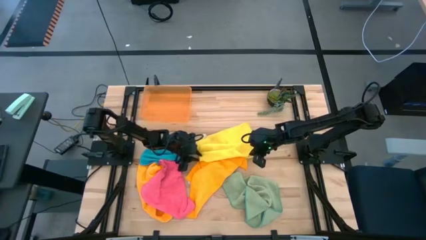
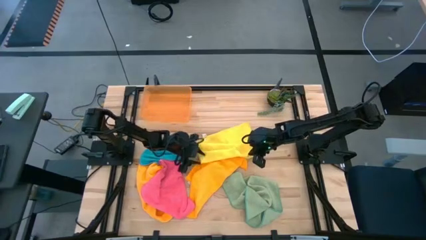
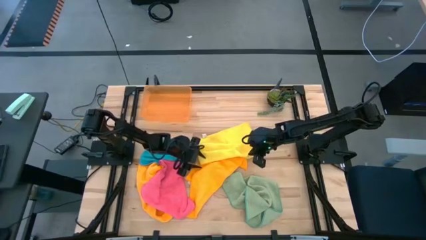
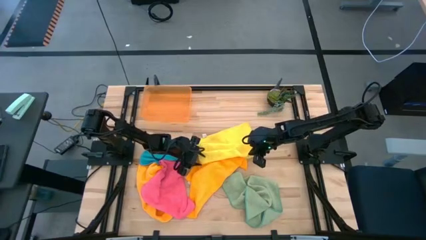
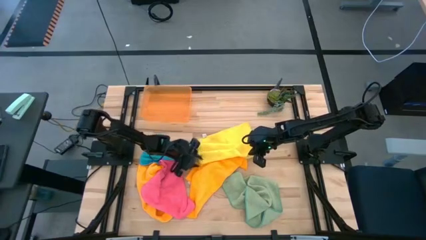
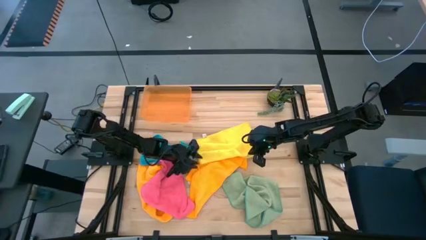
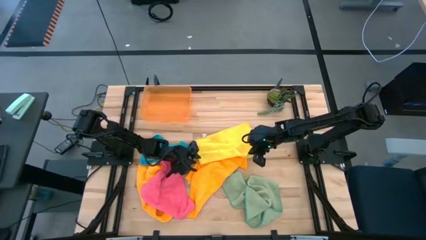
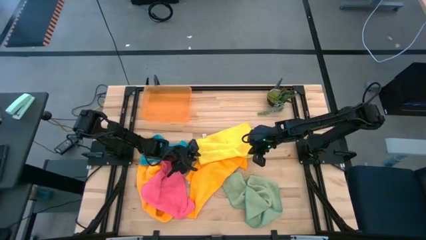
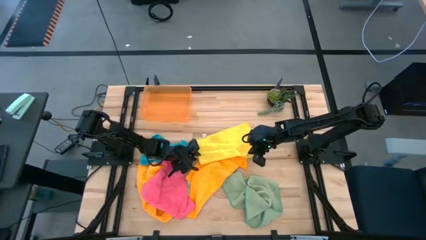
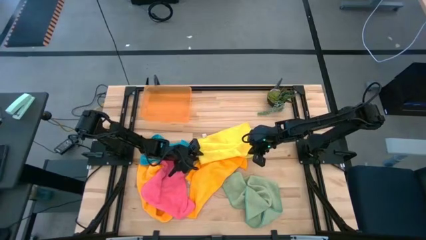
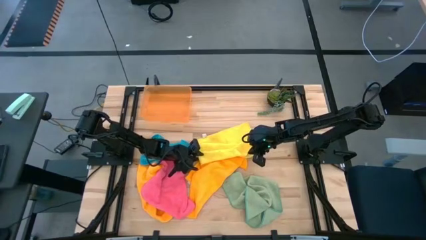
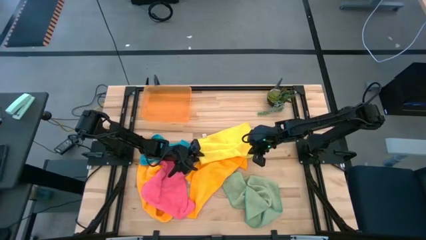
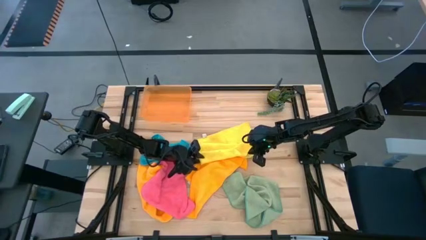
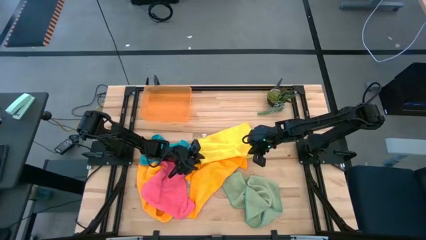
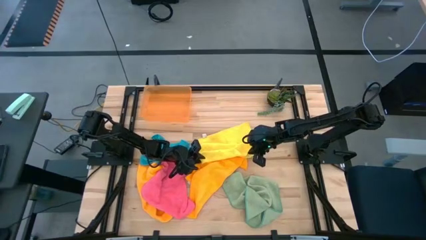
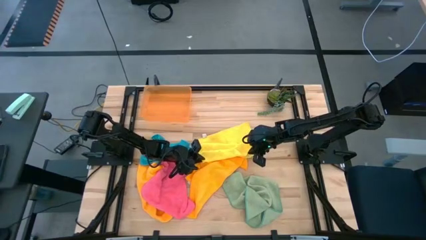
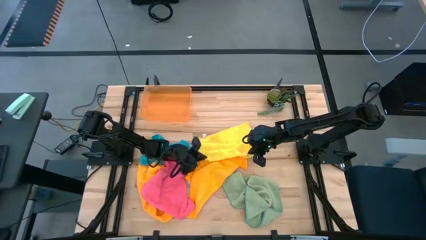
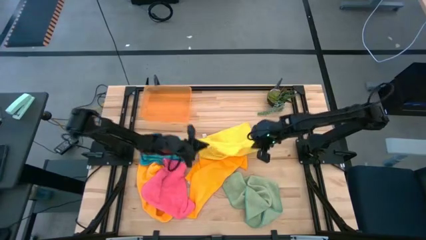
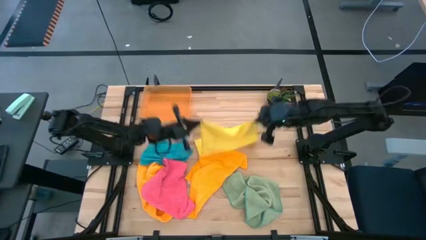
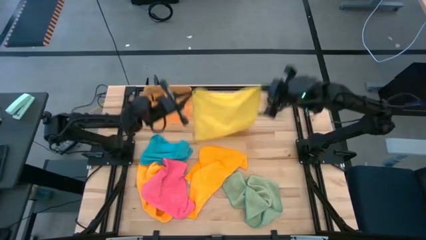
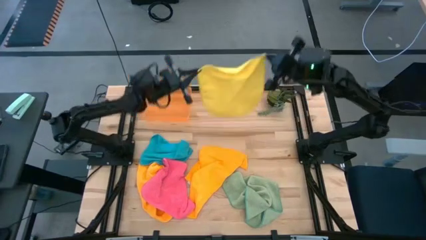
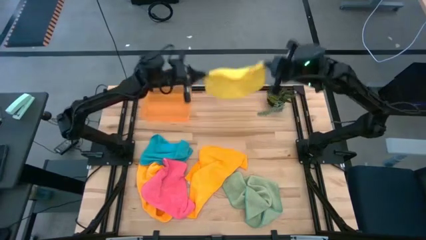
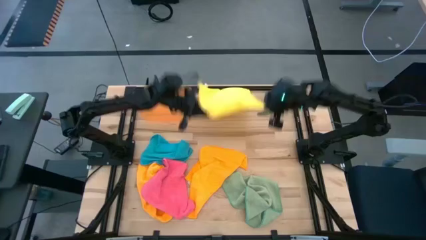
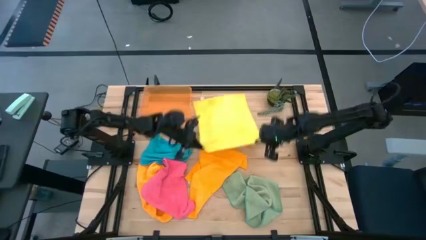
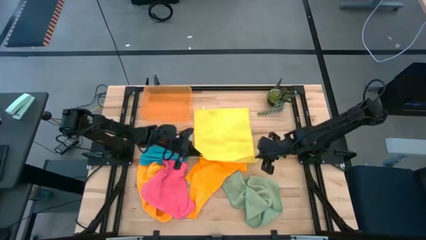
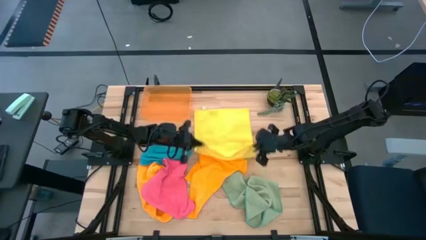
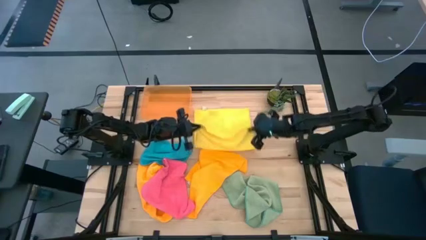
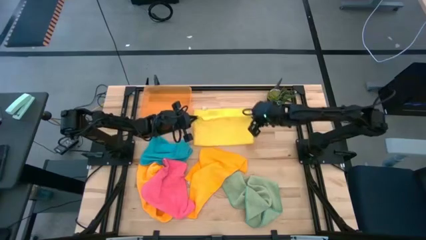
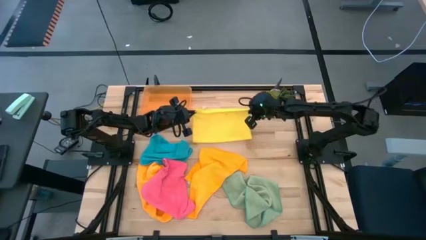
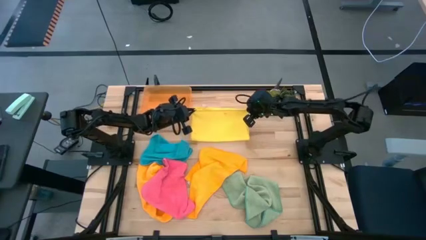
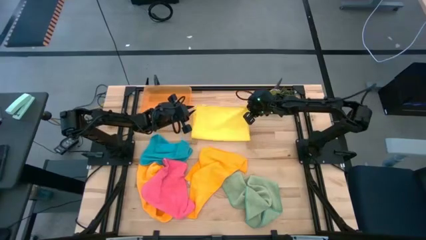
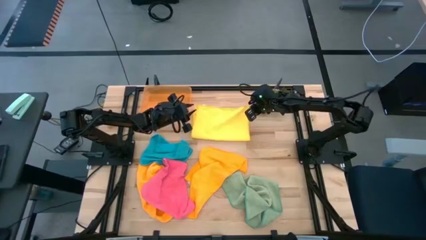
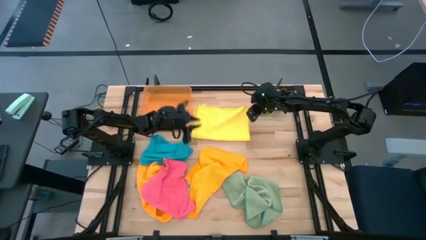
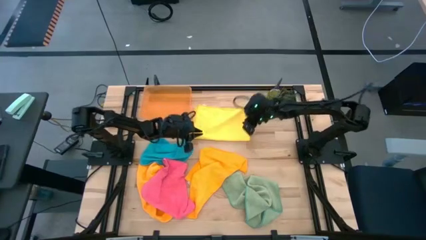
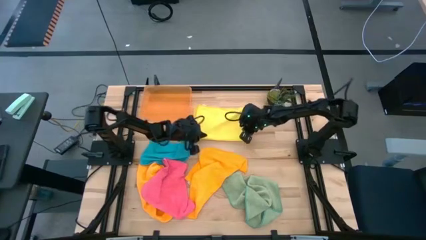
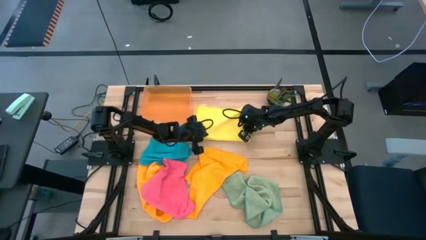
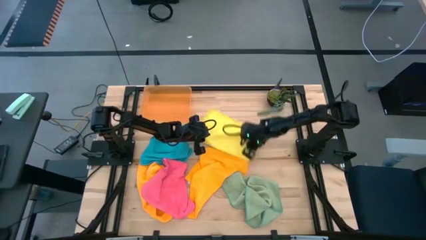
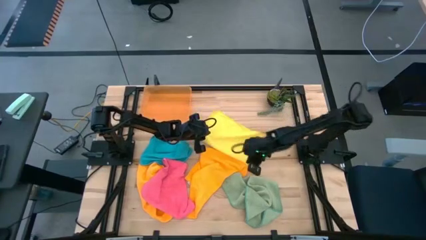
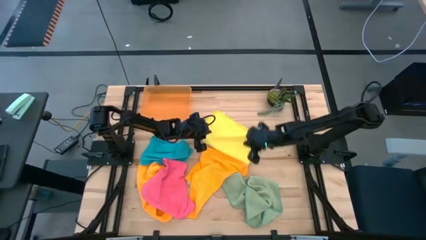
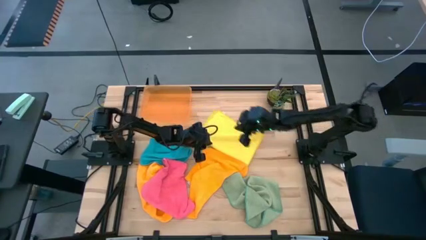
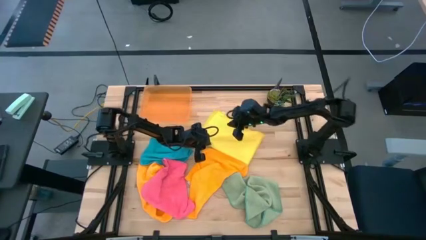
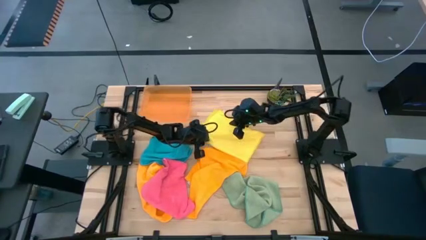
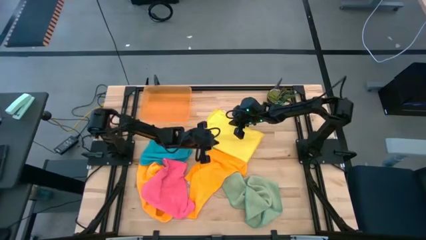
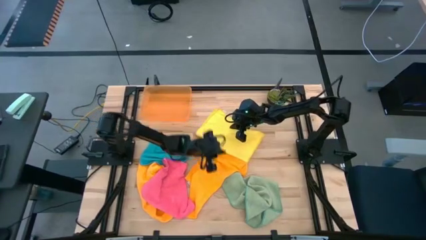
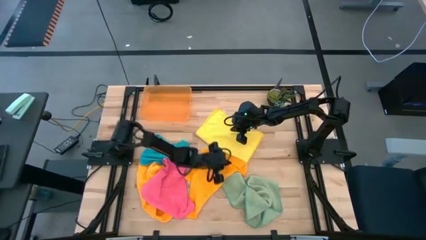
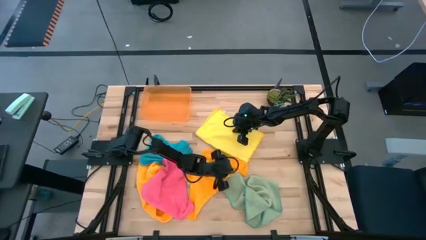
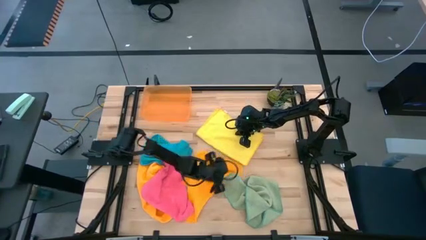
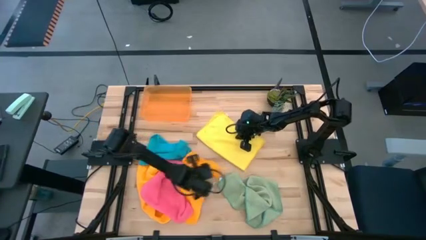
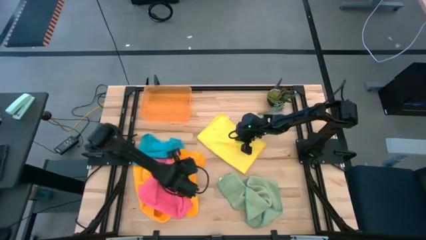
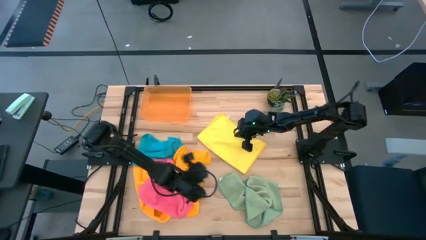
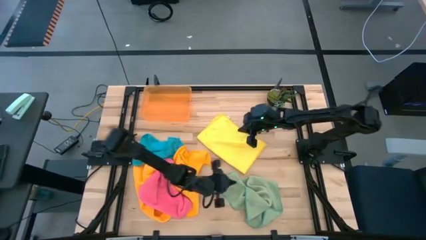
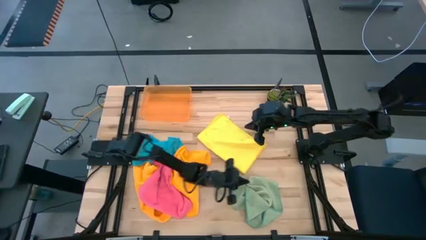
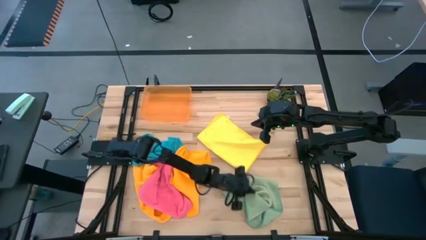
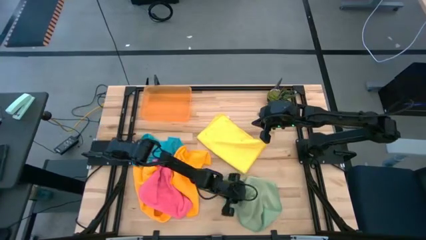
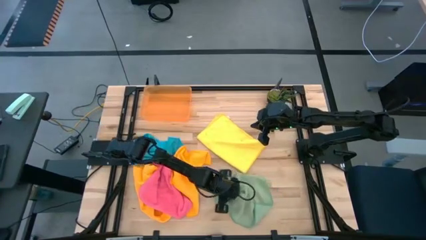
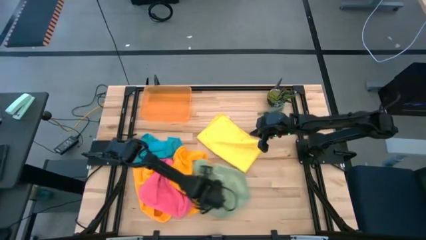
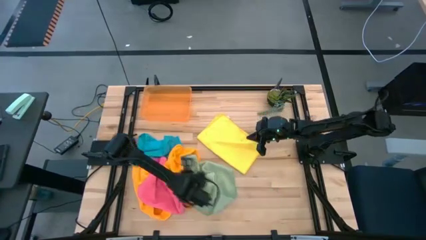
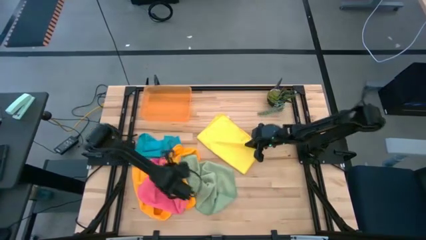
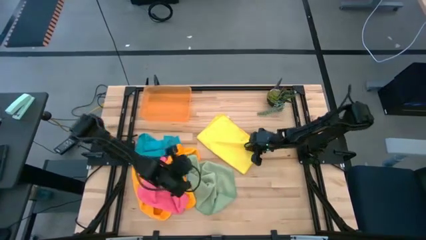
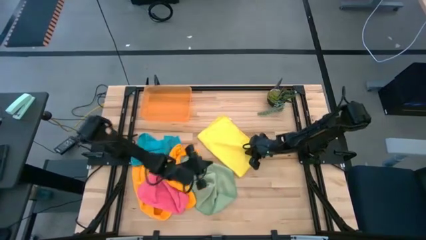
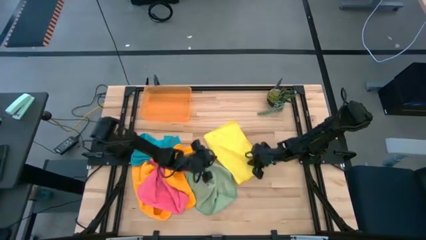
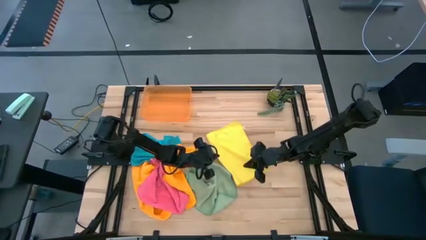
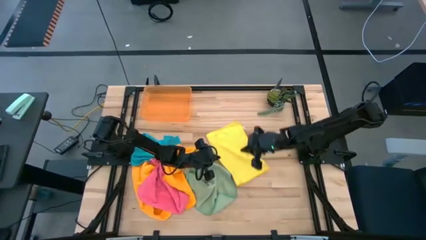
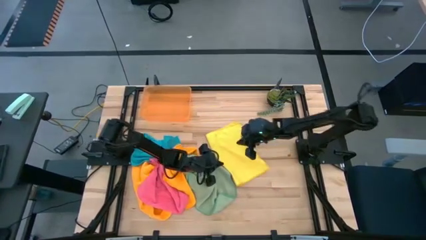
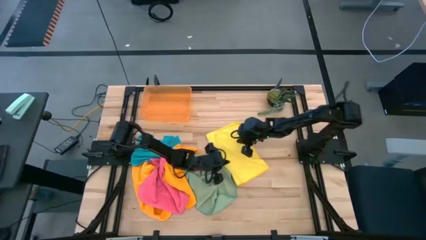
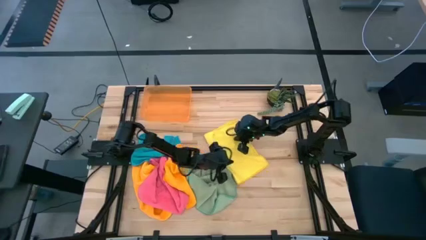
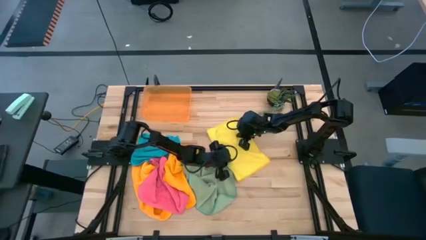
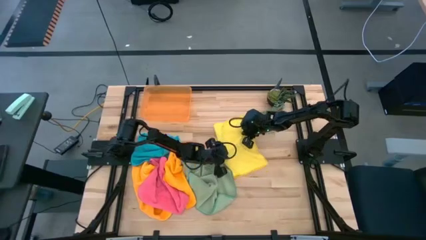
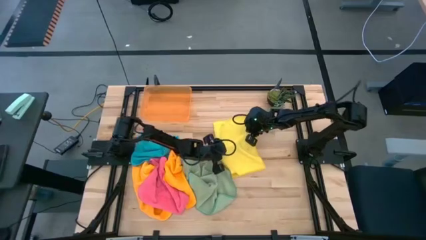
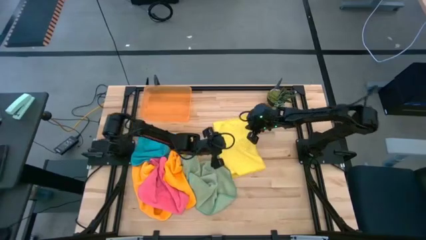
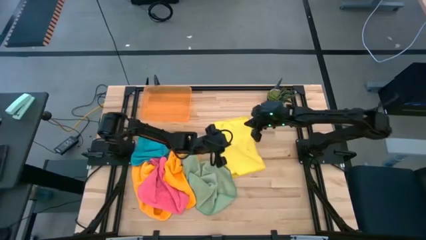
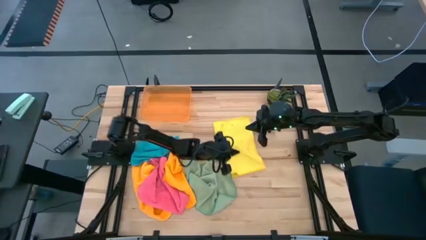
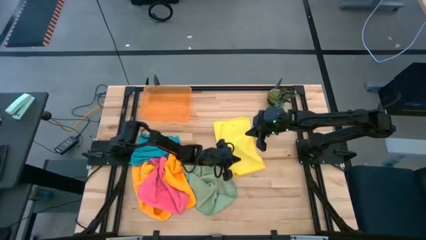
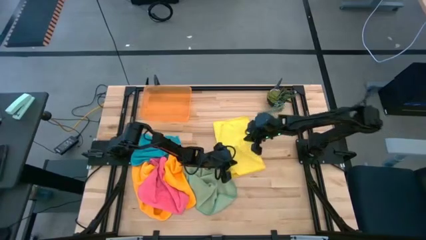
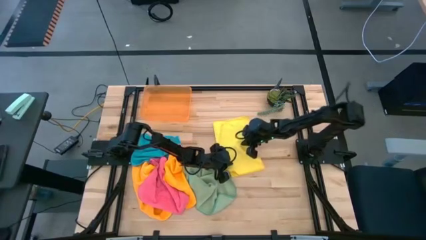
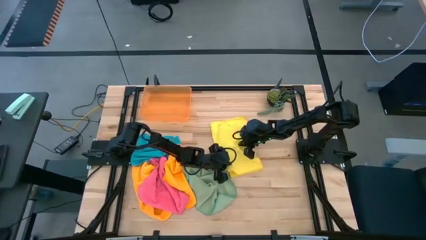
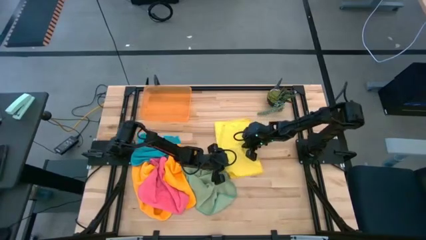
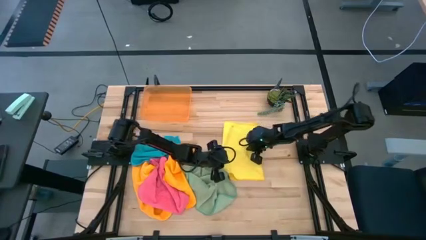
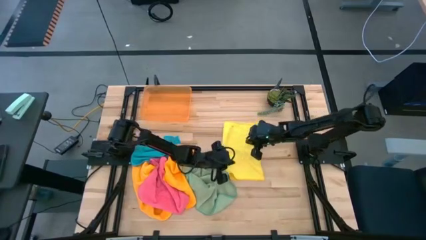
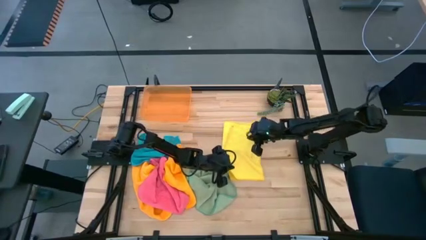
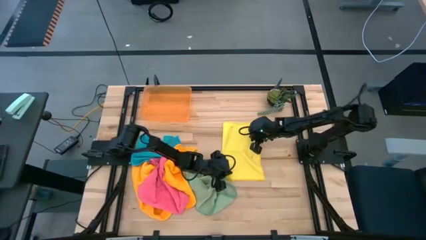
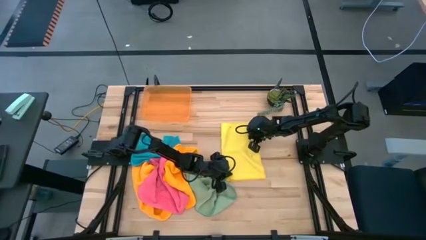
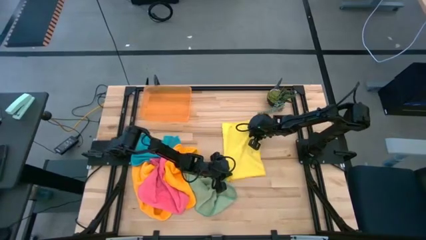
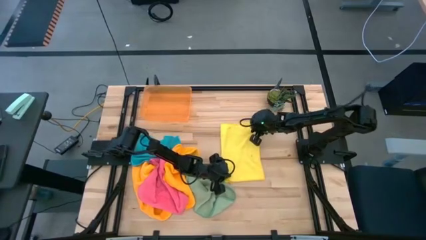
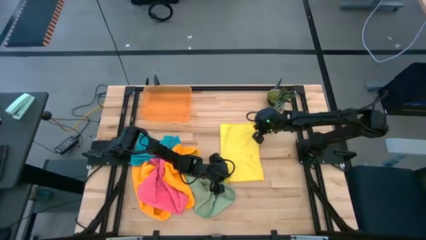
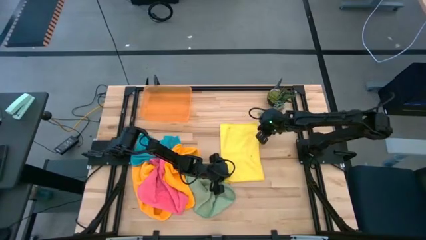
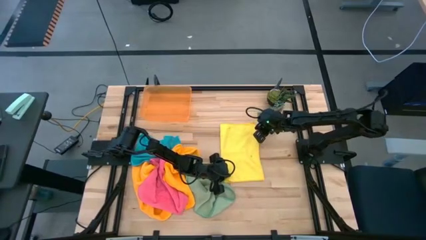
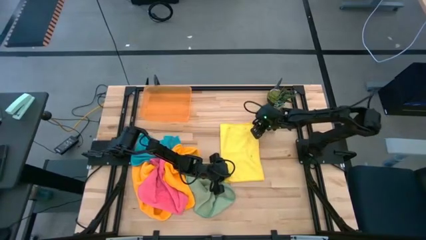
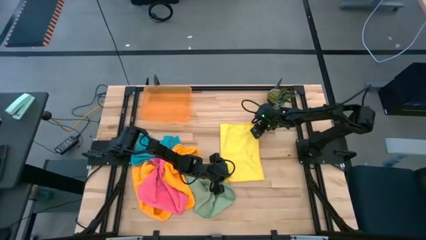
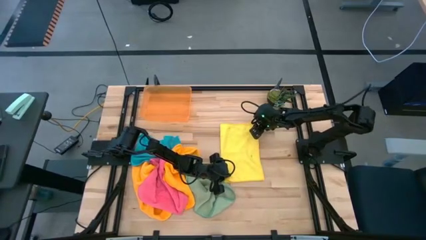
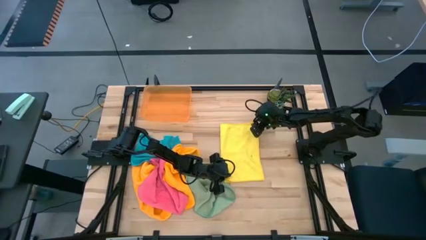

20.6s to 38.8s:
Task: Fold microfiber towels
Fold the yellow towel
